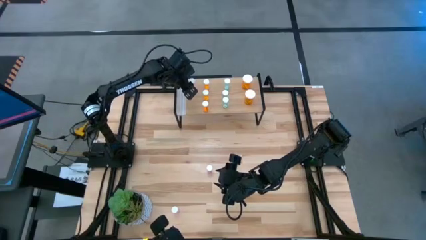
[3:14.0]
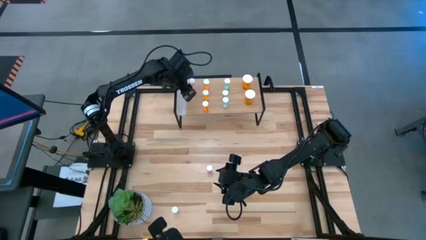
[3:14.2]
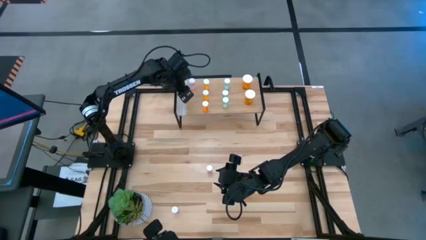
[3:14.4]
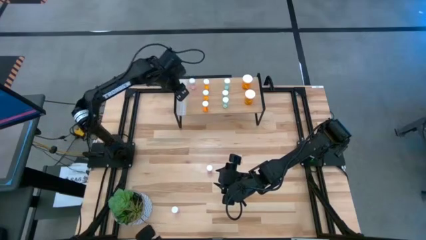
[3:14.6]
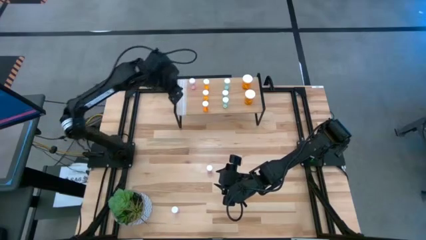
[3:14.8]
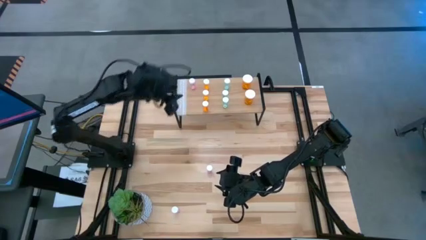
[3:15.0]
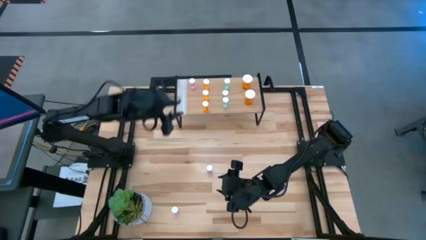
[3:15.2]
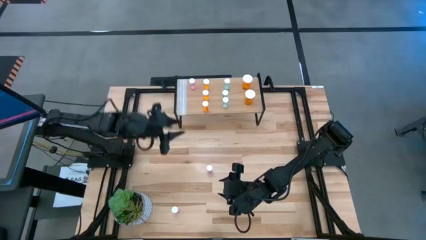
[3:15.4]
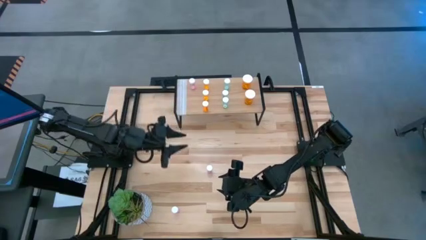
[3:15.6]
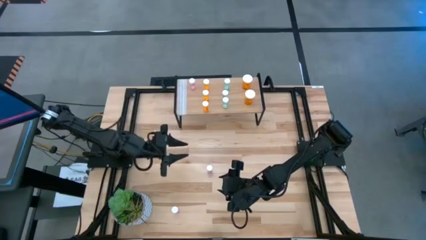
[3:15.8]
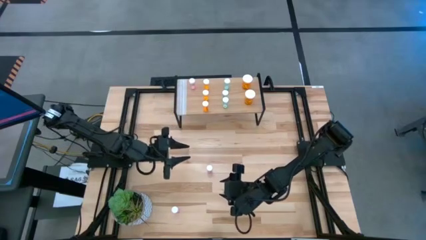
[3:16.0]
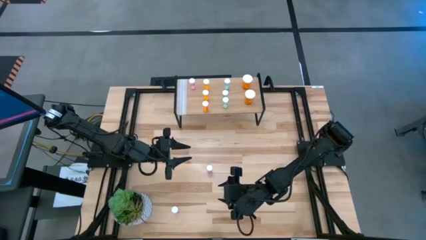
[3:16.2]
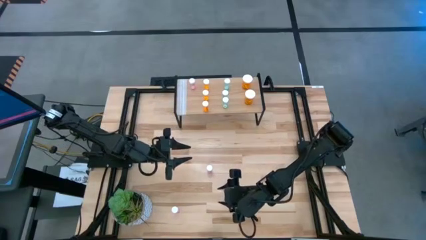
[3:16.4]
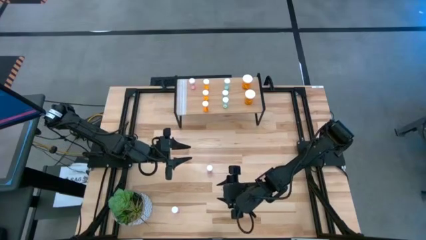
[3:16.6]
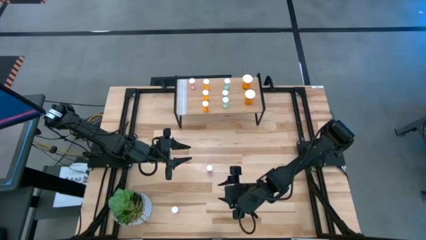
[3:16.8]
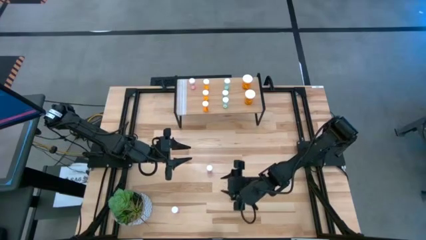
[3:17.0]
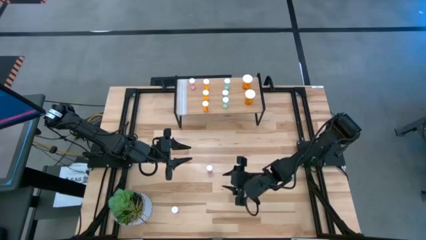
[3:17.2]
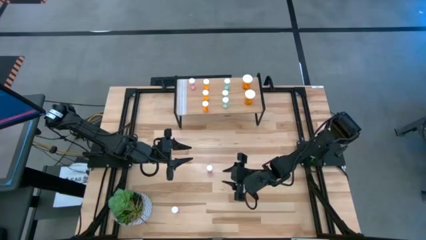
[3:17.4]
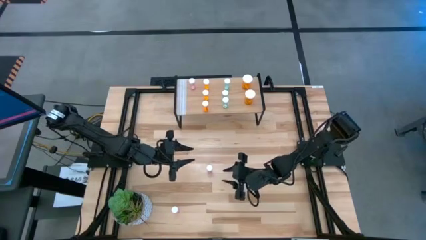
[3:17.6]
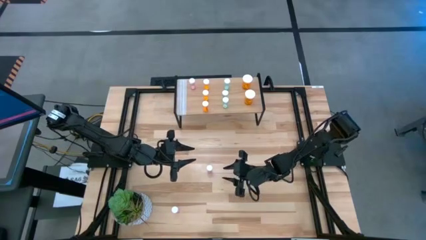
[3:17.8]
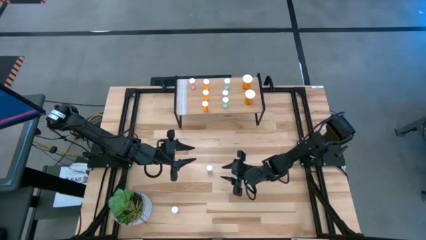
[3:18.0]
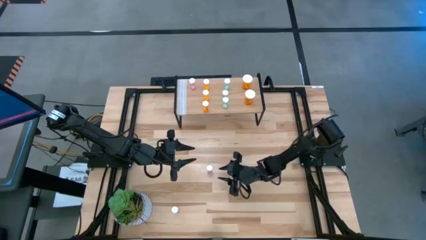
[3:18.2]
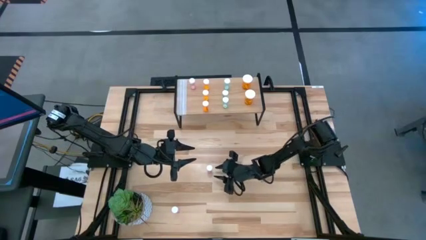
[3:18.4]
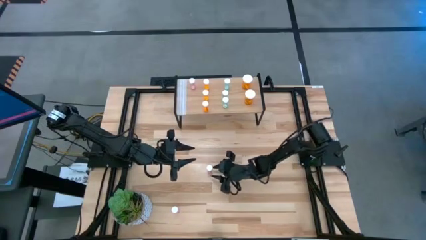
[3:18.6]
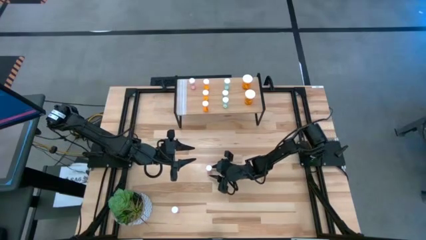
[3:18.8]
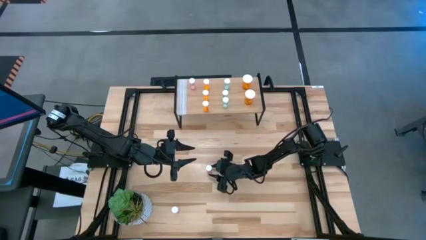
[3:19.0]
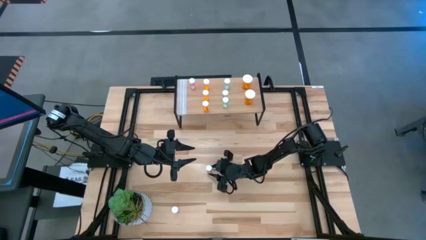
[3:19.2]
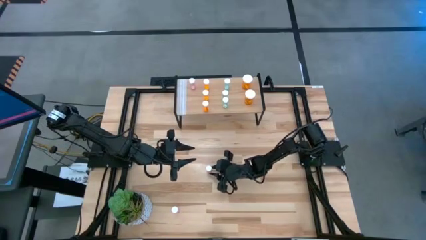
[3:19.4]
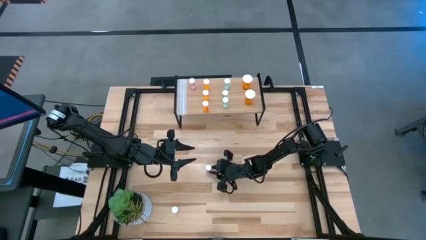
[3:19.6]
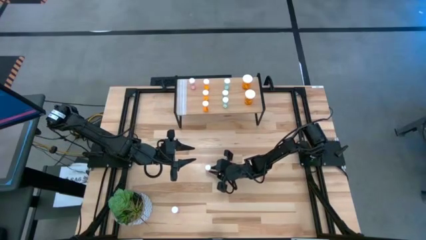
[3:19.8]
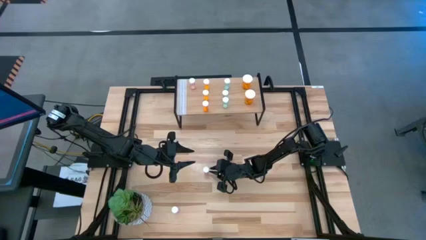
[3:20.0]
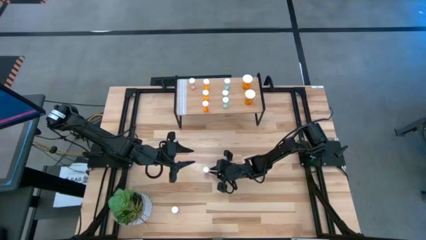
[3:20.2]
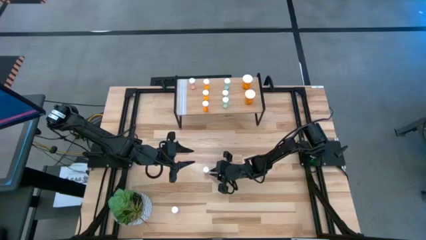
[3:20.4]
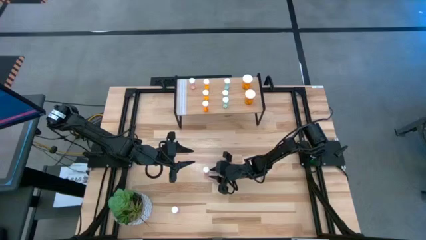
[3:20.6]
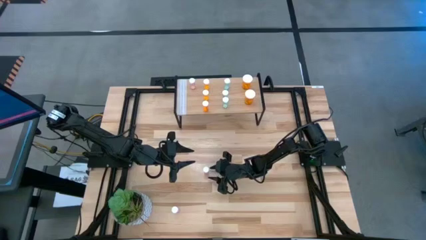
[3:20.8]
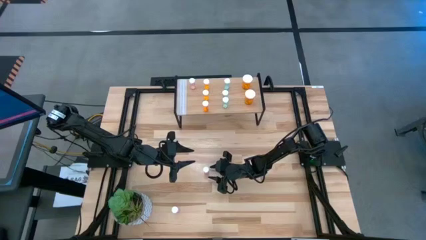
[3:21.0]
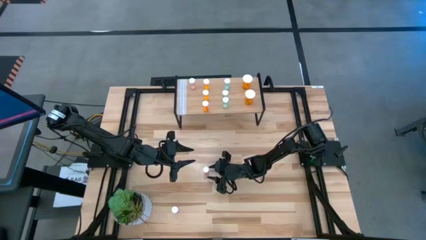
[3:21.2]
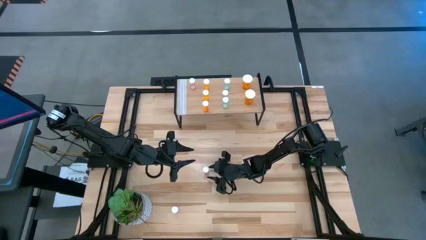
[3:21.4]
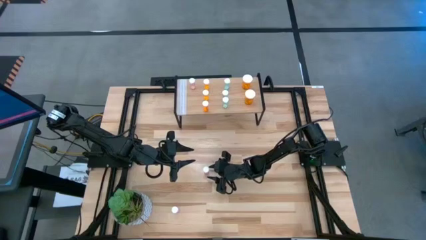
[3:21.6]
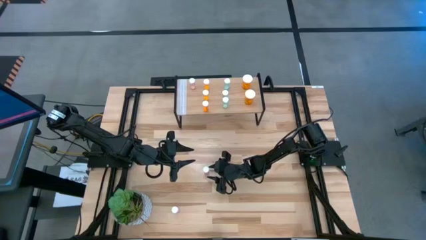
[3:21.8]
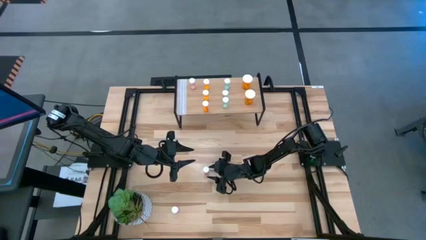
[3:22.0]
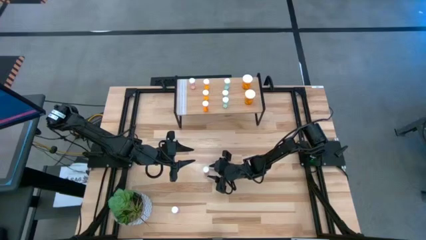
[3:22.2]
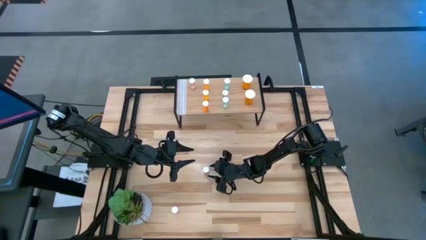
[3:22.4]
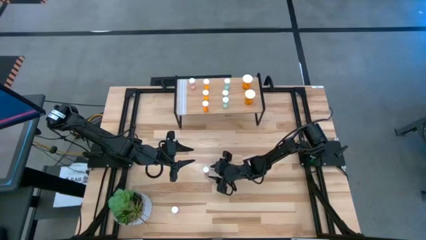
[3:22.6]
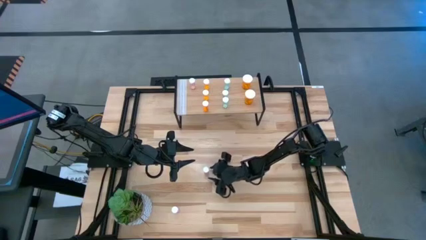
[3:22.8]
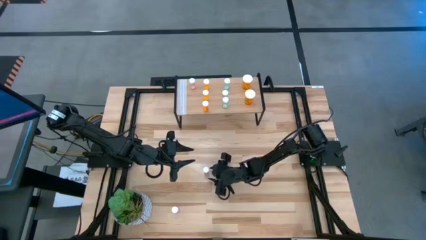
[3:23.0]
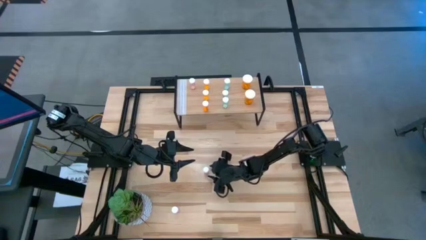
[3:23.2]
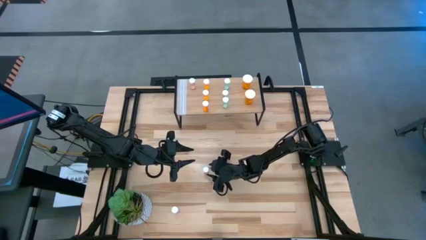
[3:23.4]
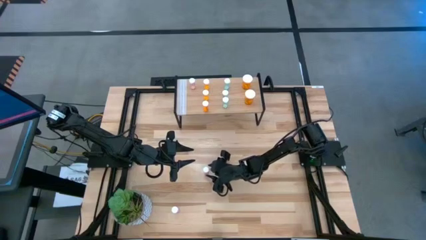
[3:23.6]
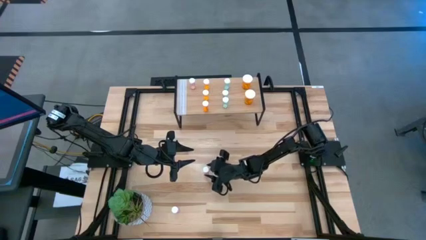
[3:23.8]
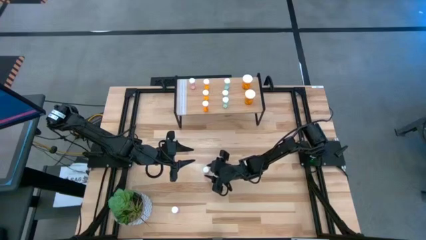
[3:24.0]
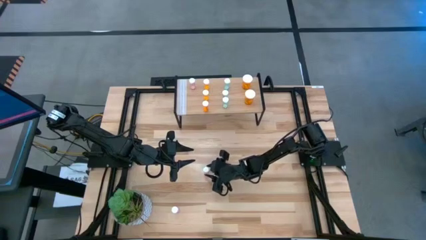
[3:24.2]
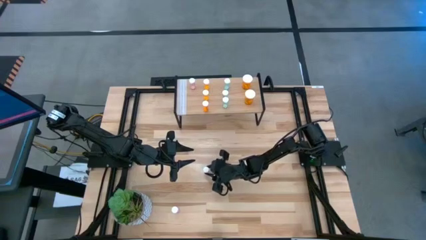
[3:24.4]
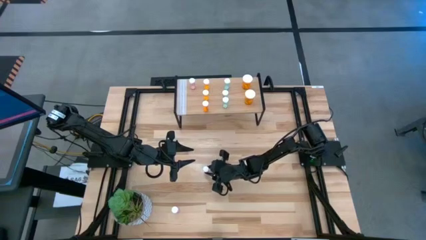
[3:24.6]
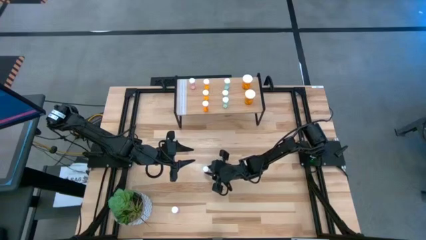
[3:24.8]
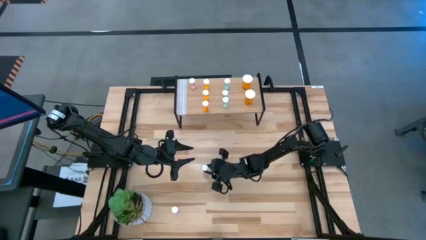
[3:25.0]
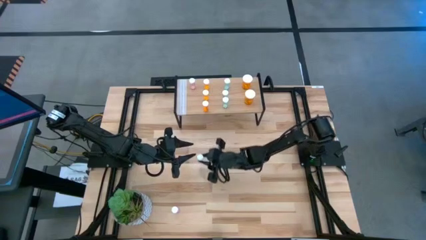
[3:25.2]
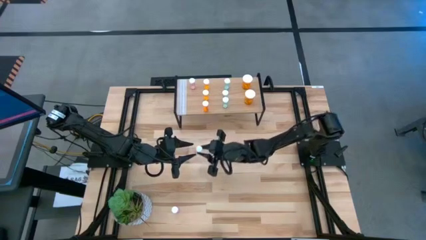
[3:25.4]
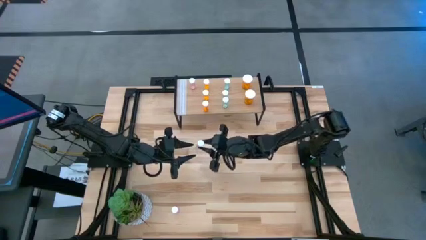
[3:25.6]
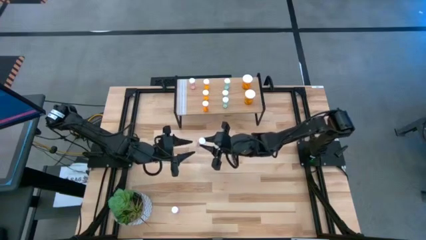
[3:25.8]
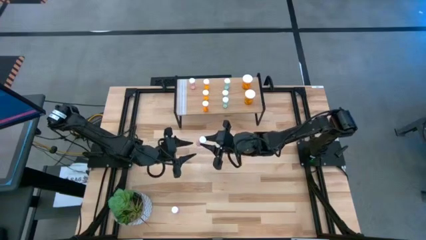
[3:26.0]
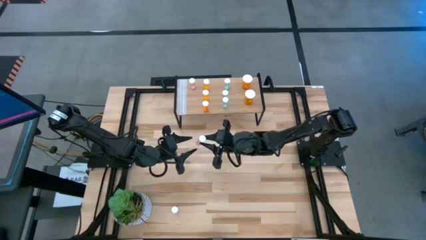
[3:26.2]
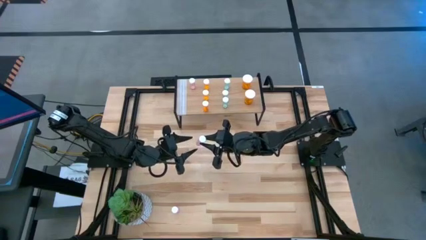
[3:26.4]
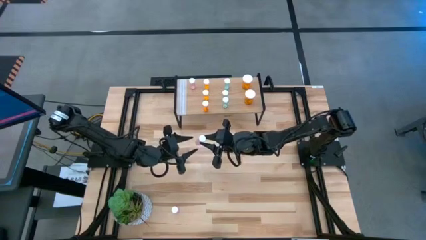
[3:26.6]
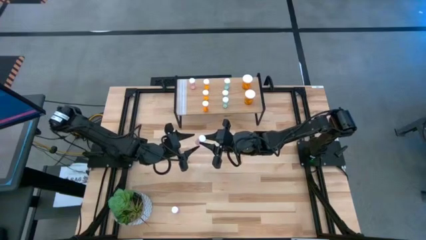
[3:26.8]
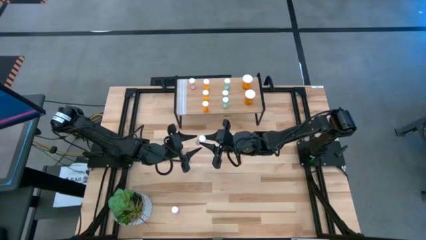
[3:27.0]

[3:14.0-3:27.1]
Task: Pick and place medicine bottles onto shelf by color
Put the top small pink pill bottle on the shelf aligned with the other small pink pill bottle

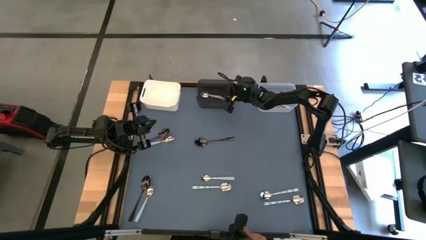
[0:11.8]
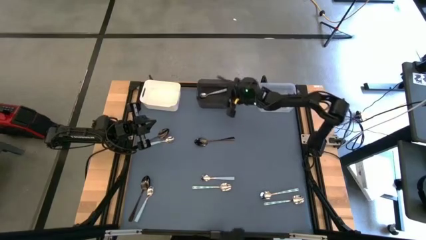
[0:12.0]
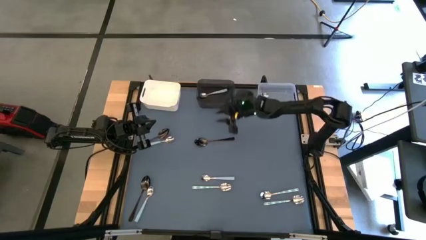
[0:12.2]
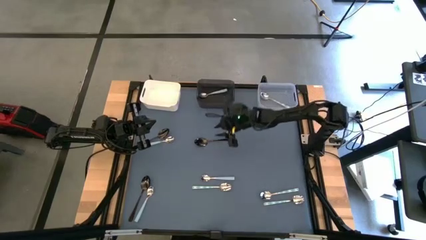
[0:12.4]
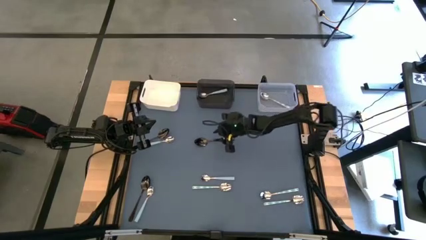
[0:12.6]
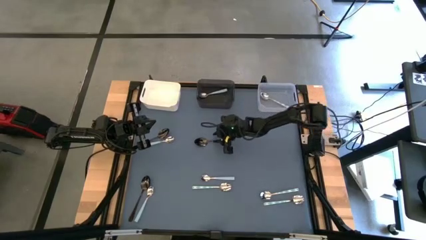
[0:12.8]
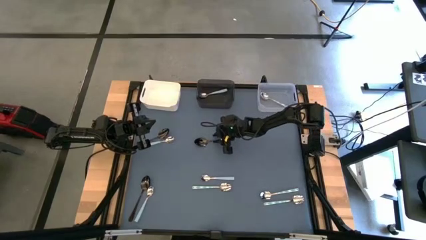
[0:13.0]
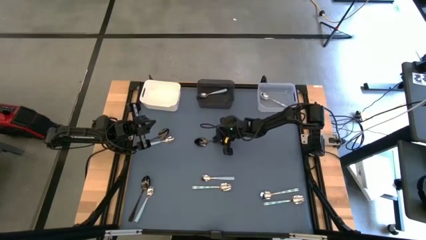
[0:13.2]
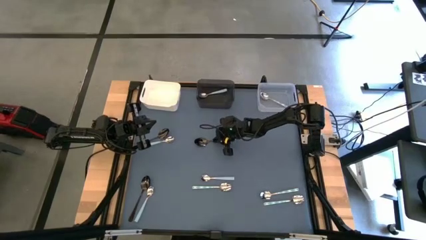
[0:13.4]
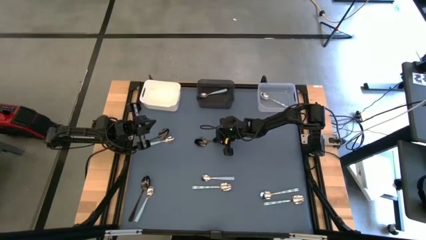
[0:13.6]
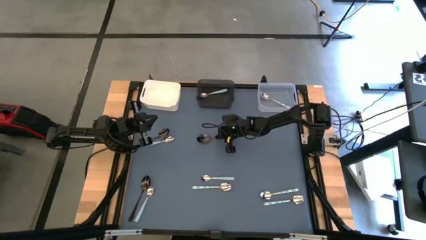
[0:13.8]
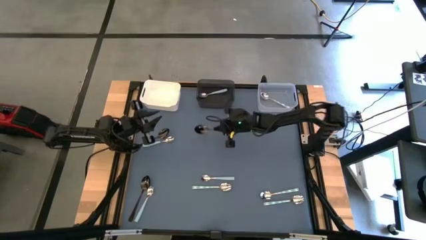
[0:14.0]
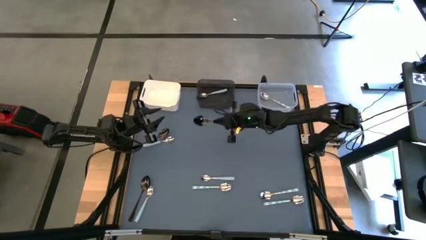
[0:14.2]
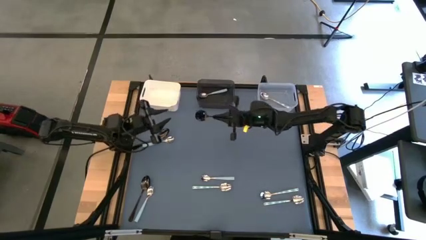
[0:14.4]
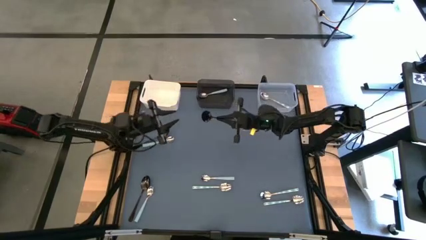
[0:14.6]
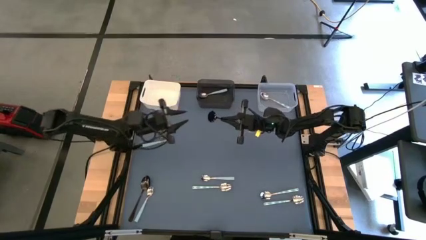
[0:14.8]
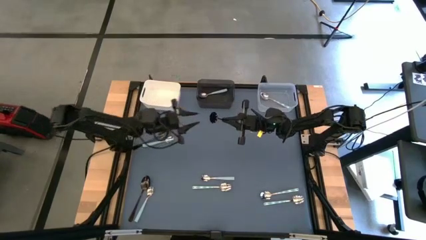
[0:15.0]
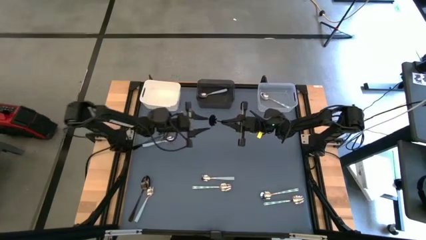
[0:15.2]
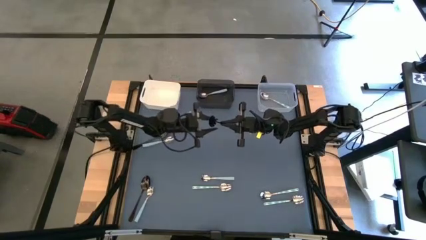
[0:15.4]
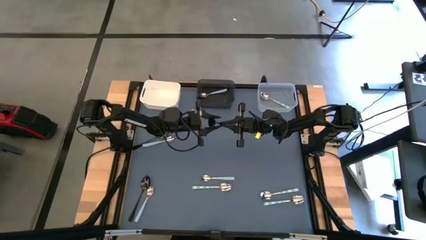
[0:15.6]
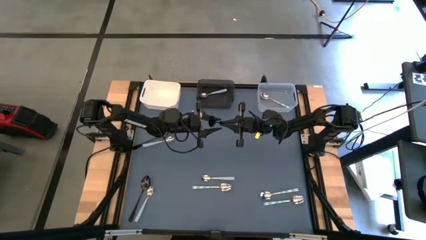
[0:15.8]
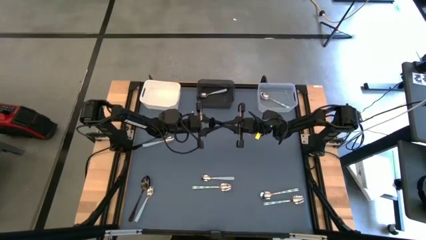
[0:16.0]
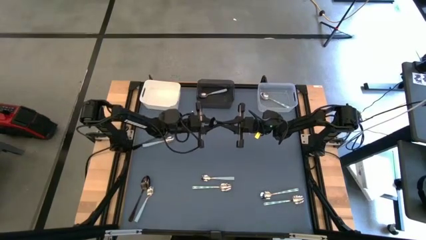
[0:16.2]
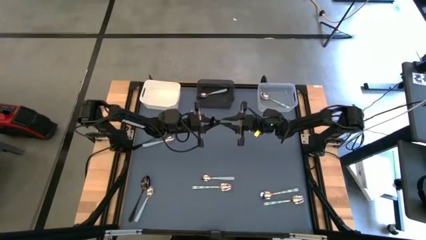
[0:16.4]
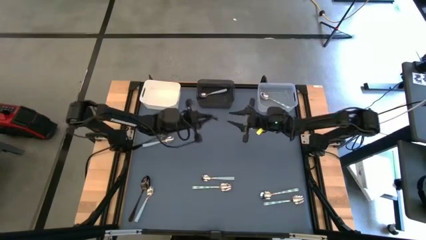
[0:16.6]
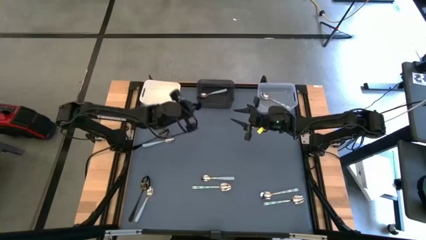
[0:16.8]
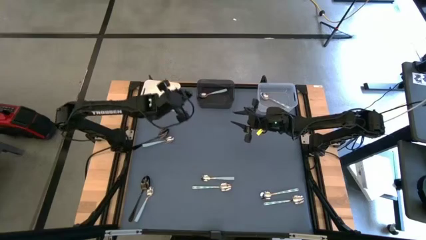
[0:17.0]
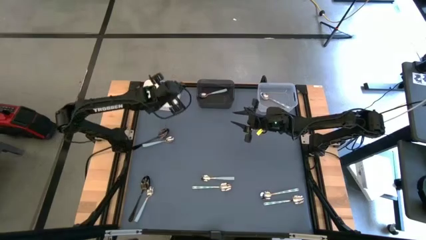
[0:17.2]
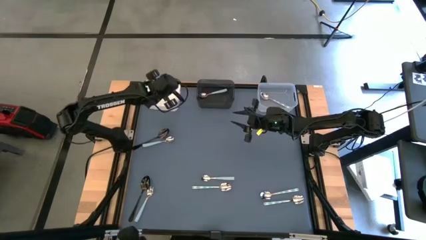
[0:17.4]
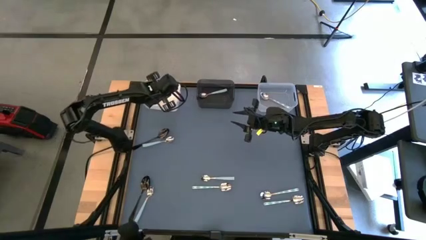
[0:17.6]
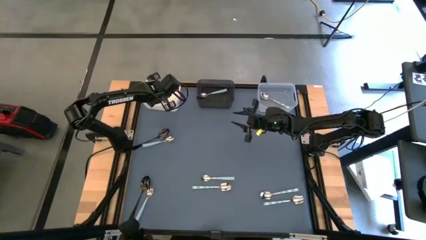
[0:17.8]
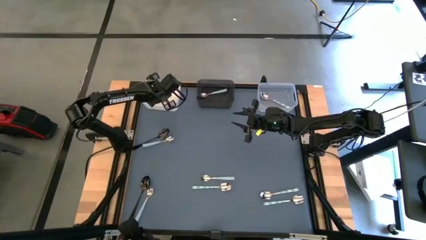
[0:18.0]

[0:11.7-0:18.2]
Task: Sort silverware by color (type)
Put the top middle black spoon into the white bin
